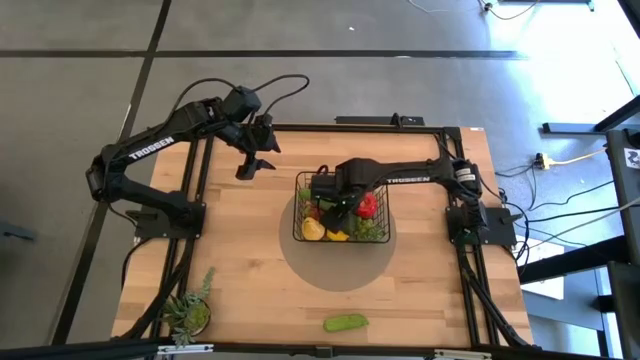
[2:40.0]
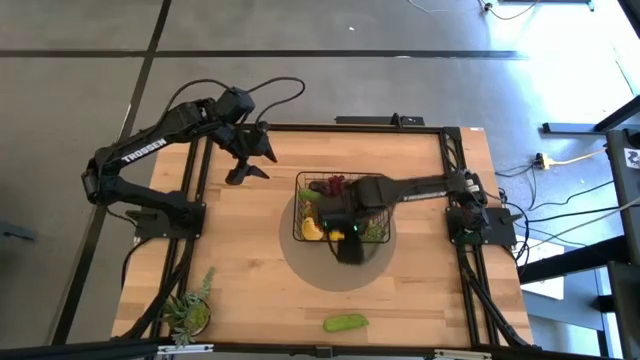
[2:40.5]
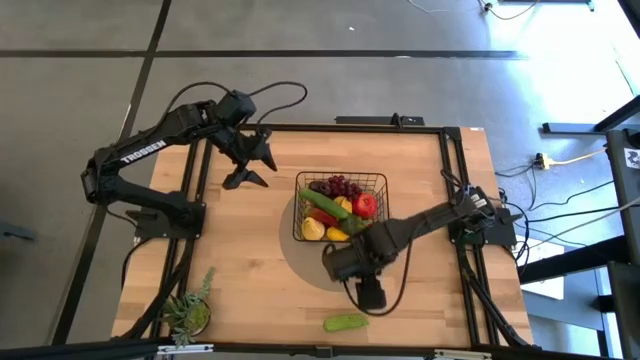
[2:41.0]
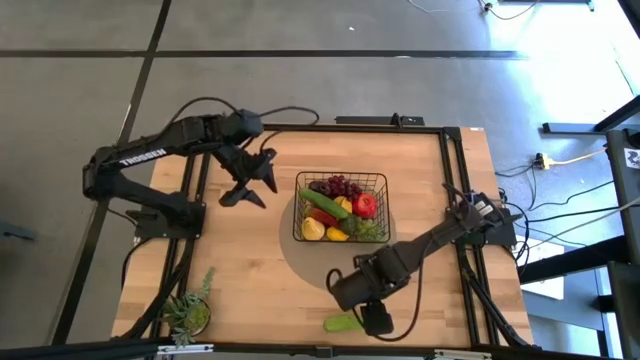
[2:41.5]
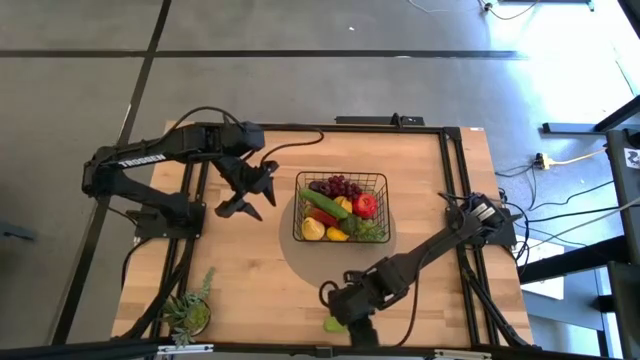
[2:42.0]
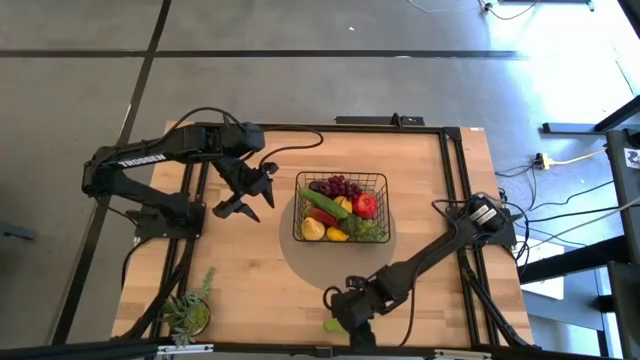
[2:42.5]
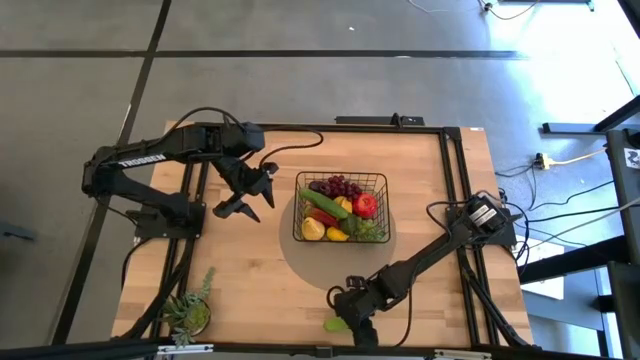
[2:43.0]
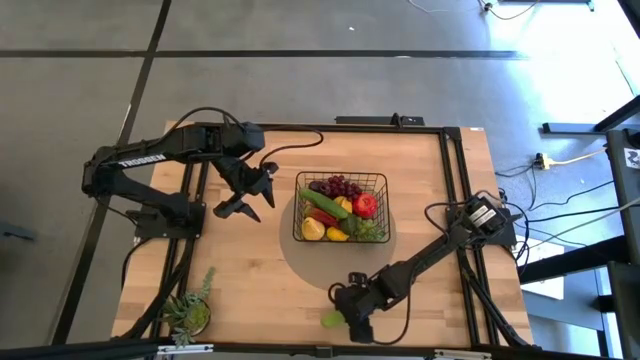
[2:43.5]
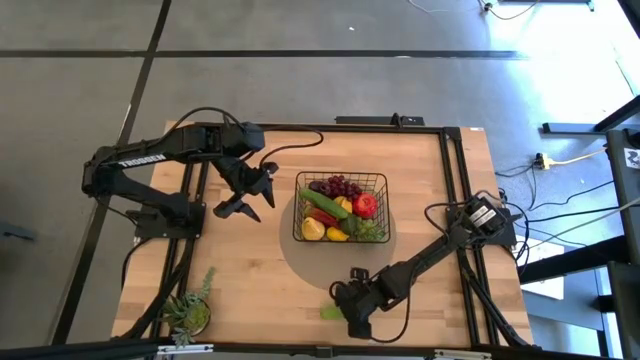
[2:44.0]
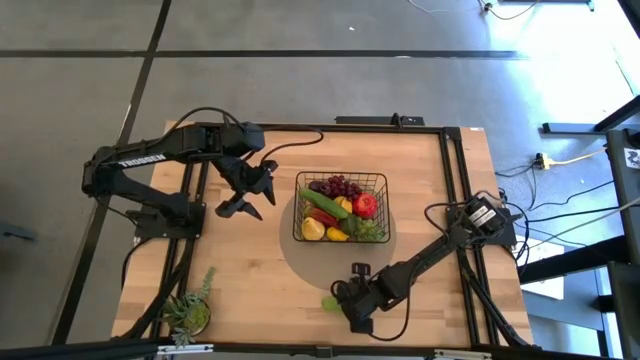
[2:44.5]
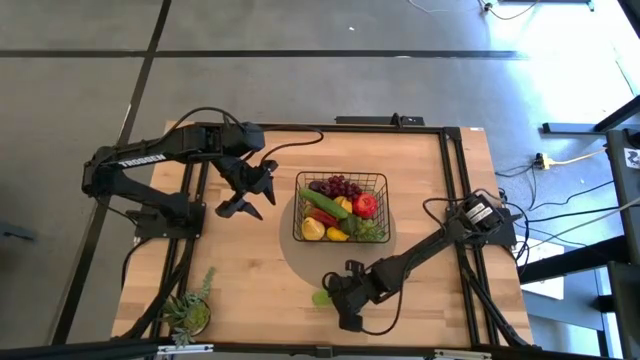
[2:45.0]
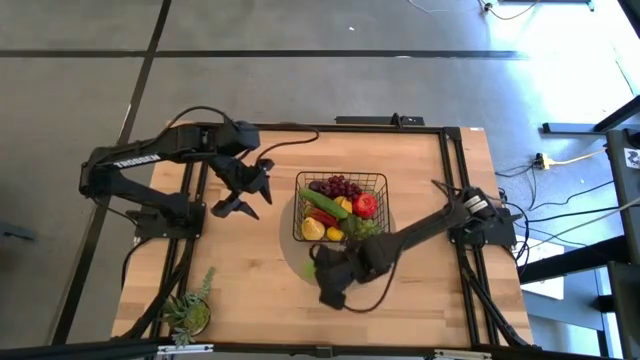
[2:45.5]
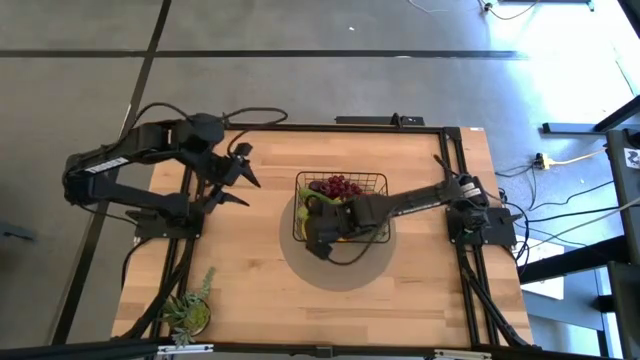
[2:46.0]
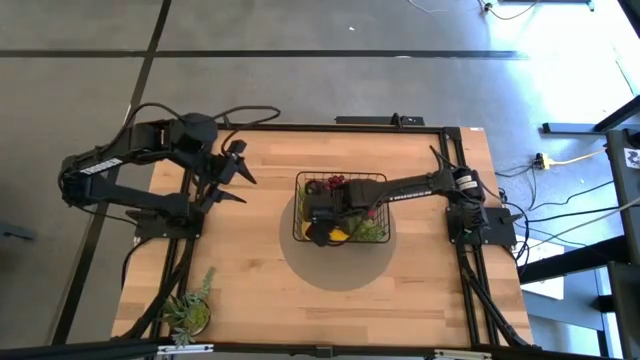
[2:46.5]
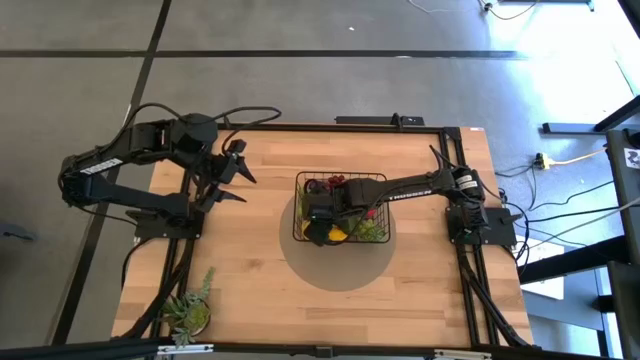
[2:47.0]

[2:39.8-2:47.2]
Task: Build produce basket
Put the green cucumber into the black wire basket

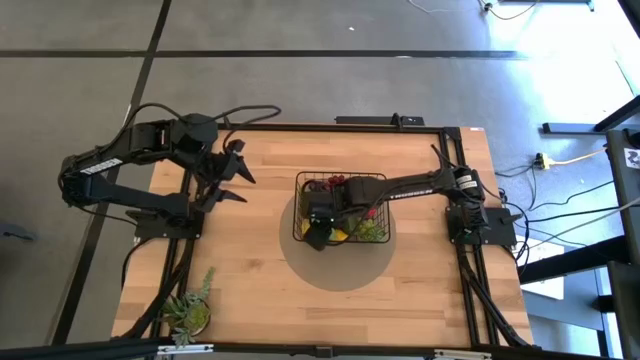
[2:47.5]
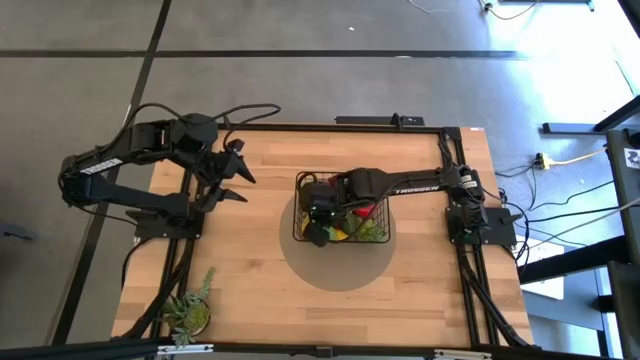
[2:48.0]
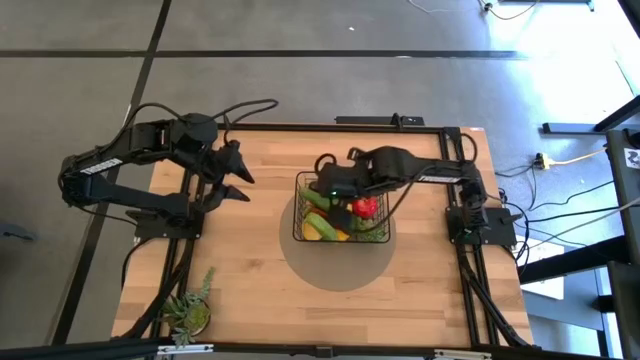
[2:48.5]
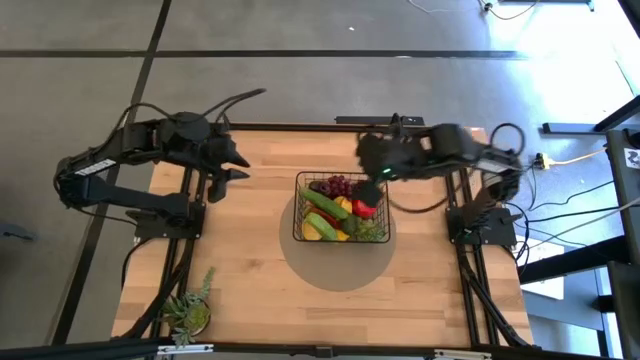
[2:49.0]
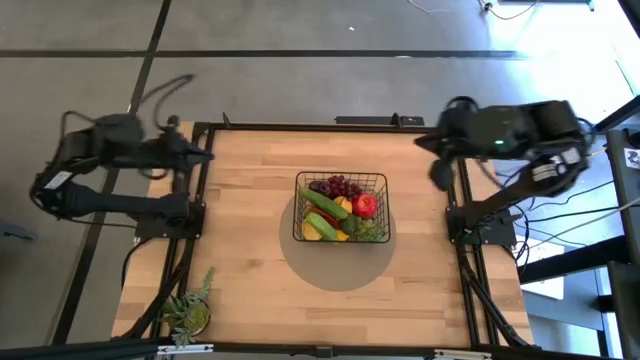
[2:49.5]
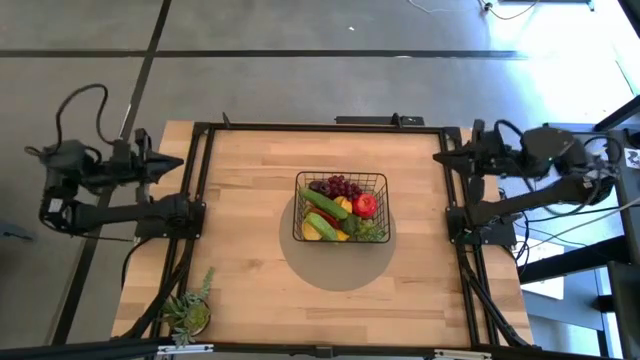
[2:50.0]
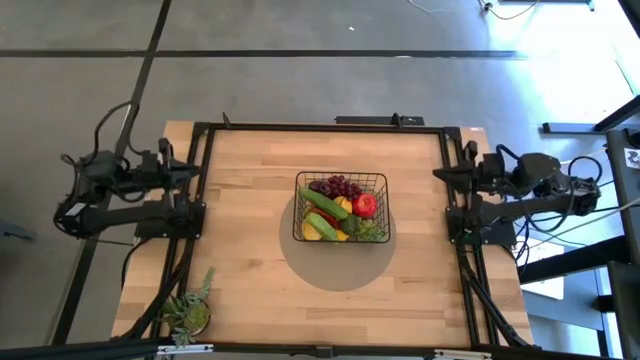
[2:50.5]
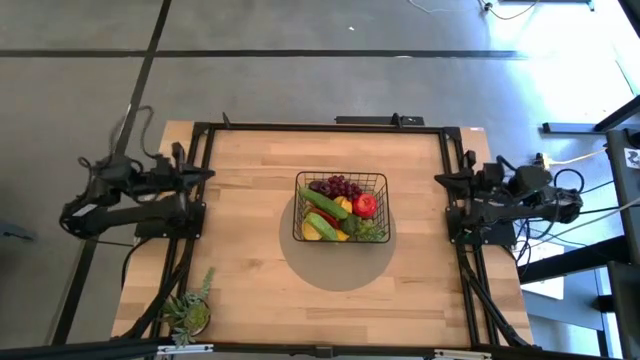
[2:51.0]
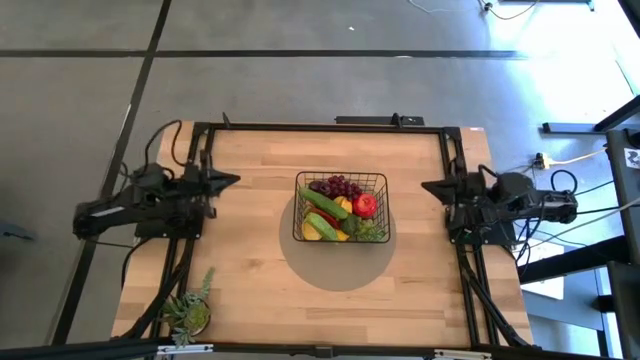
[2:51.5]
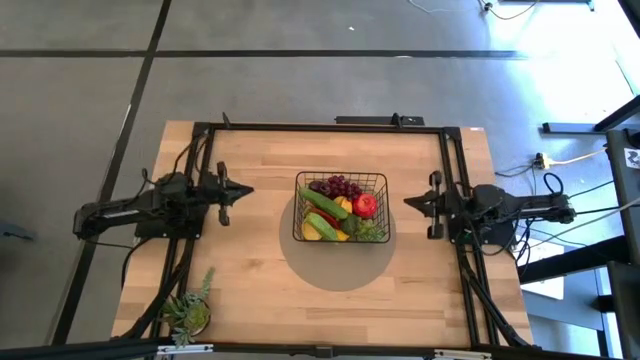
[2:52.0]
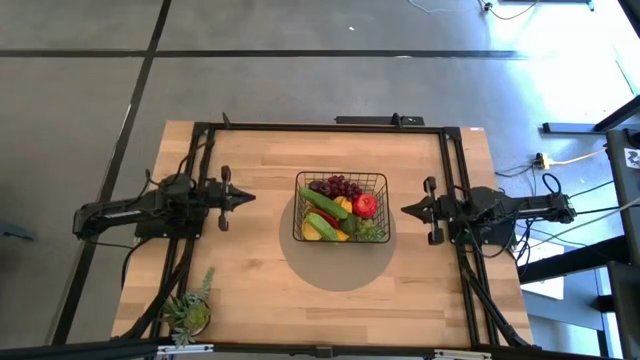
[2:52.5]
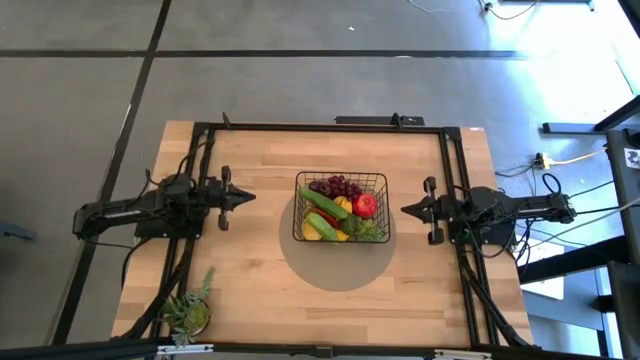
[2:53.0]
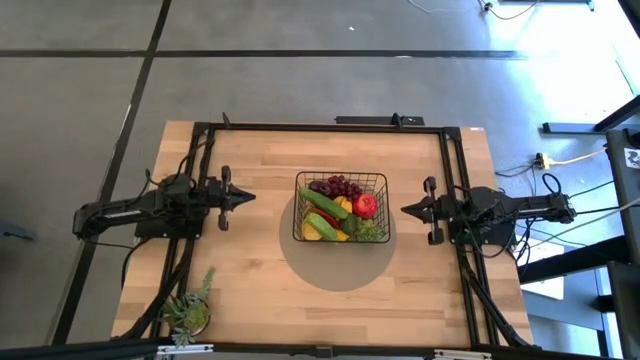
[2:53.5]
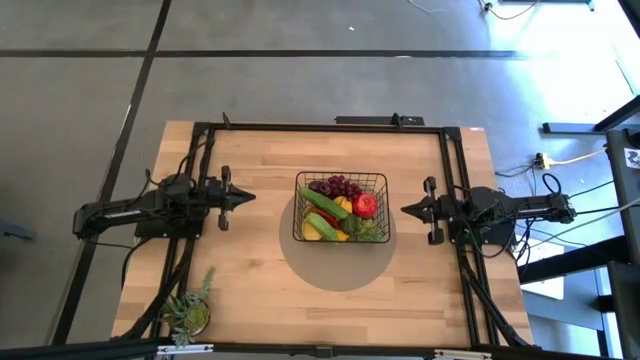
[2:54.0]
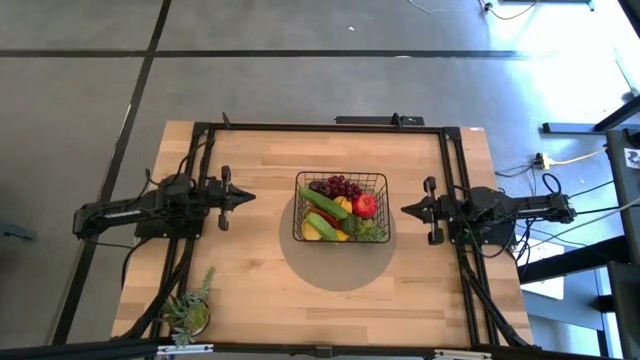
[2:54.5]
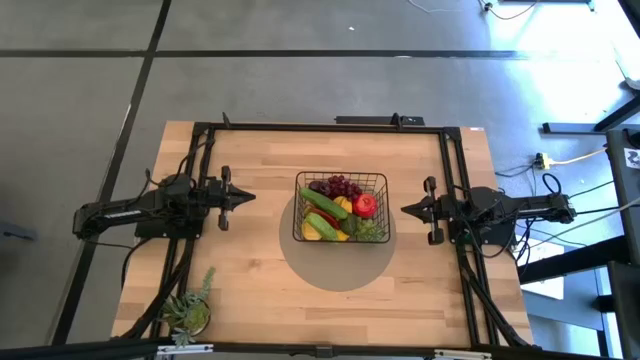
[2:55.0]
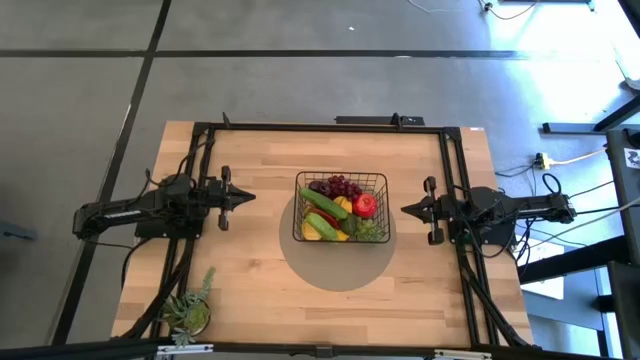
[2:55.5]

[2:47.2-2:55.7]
Return to Home Position

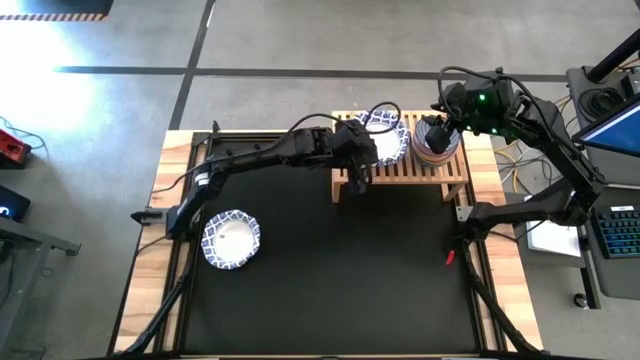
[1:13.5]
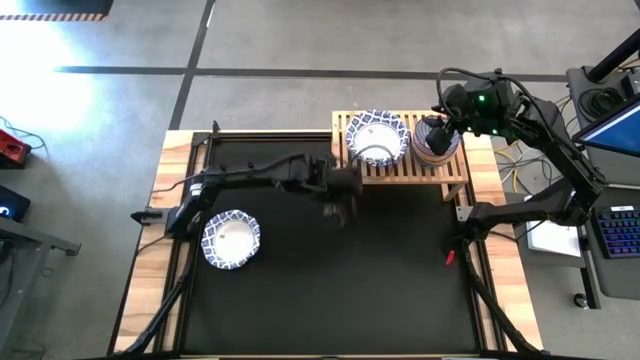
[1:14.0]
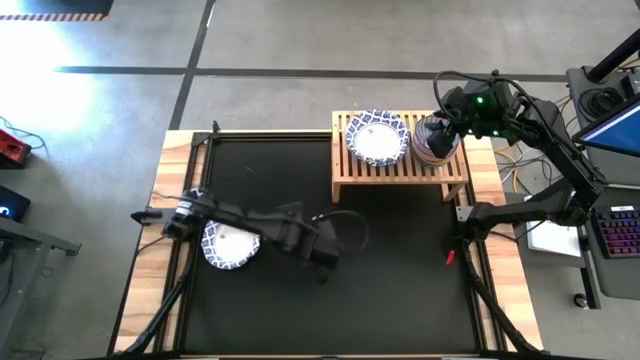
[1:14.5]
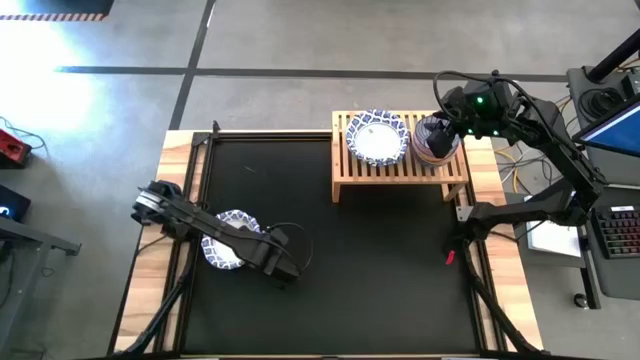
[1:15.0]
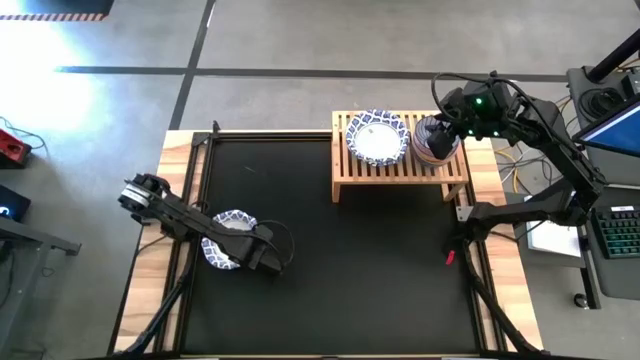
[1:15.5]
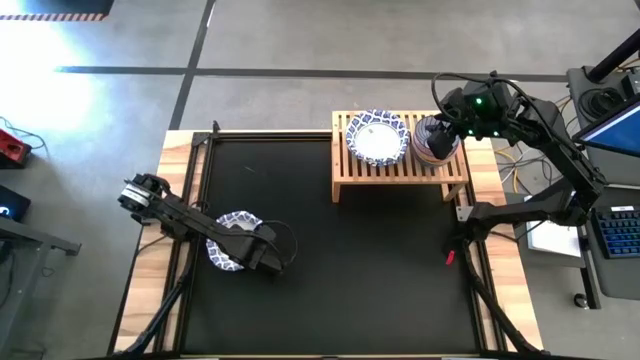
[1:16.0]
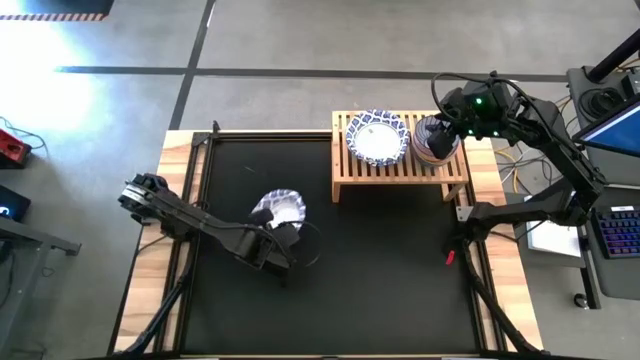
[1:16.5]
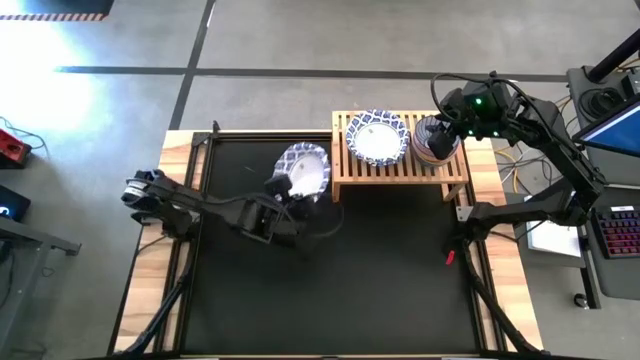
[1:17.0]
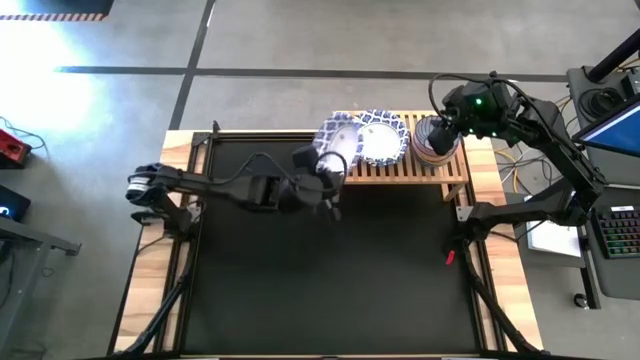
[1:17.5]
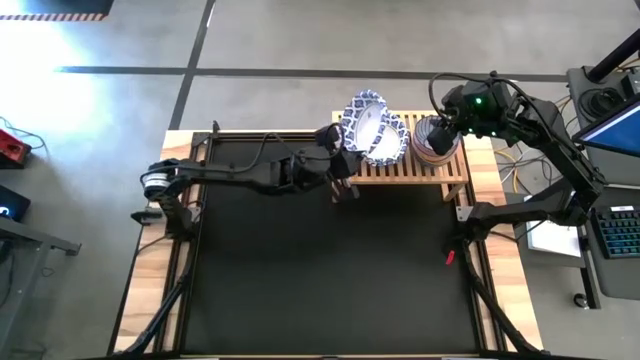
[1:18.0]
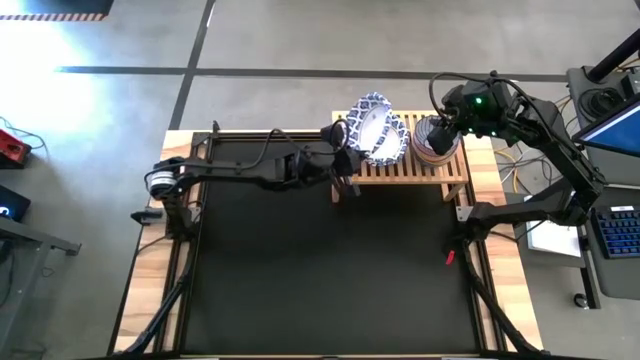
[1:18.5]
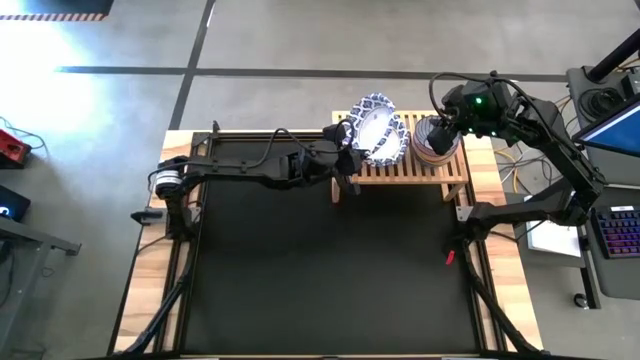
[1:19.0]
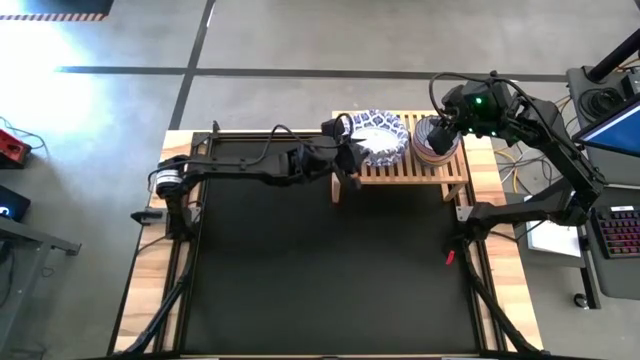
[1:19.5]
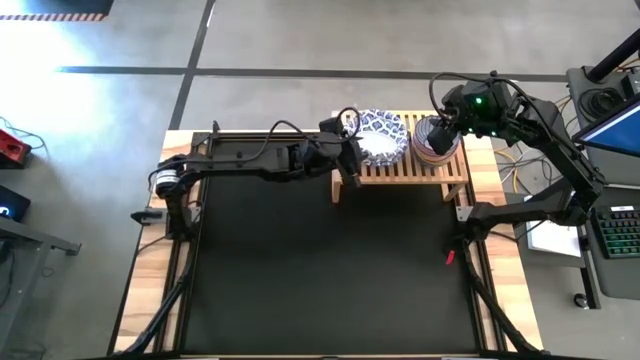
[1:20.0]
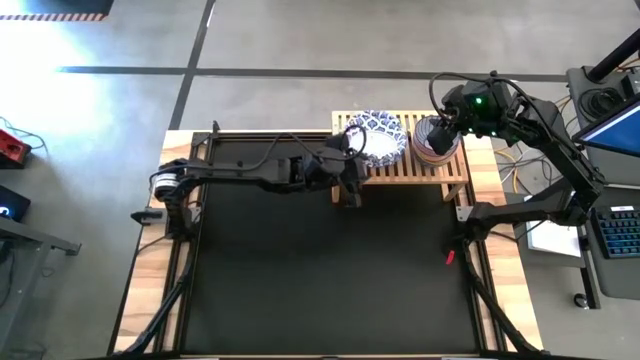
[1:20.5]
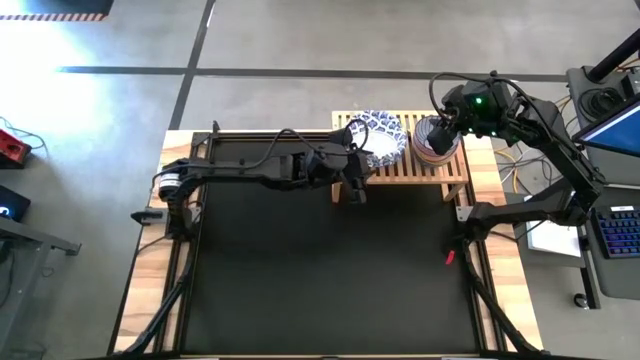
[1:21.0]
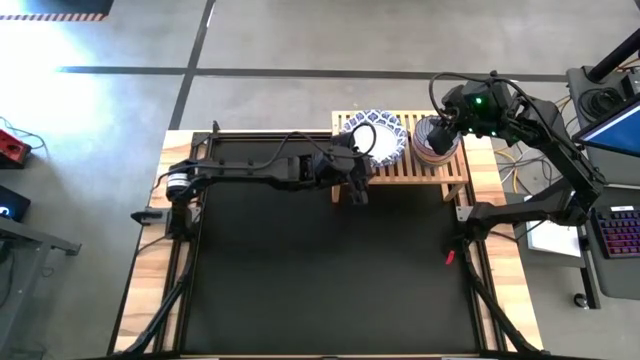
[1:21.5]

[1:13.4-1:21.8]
Task: Place and stack bowls onto a shelf
Stack the white bowl on top of the other white bowl on the shelf
